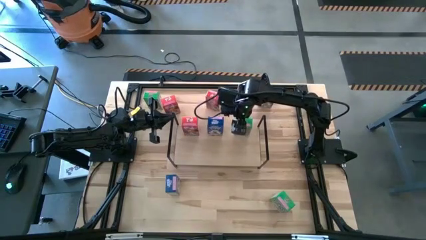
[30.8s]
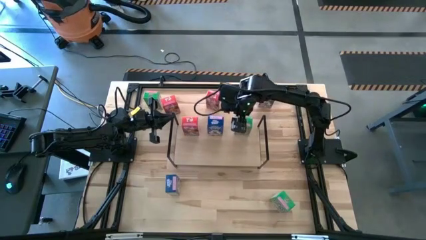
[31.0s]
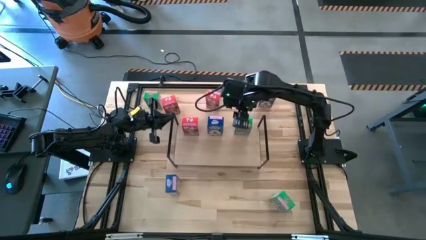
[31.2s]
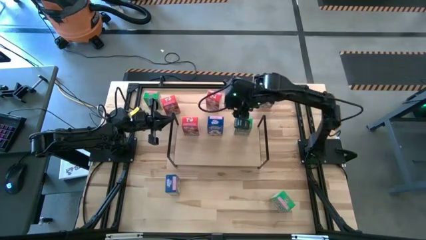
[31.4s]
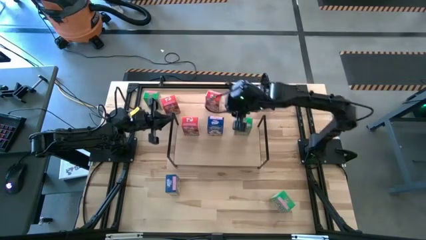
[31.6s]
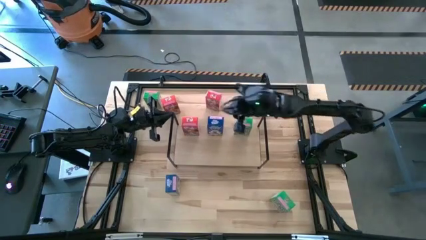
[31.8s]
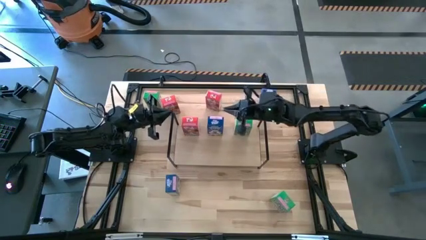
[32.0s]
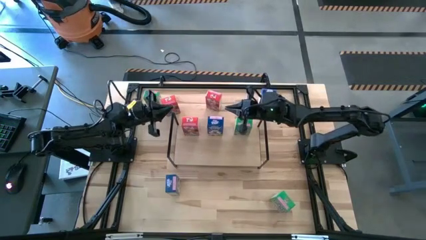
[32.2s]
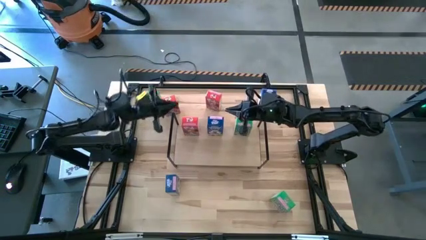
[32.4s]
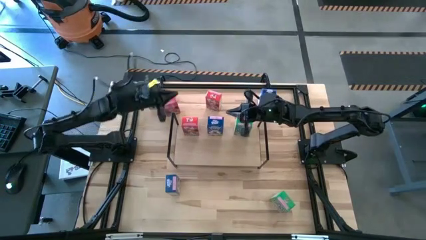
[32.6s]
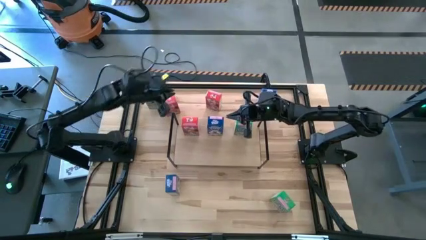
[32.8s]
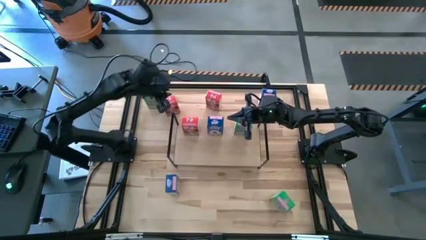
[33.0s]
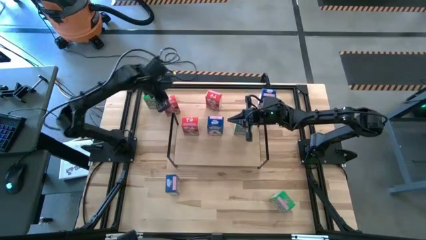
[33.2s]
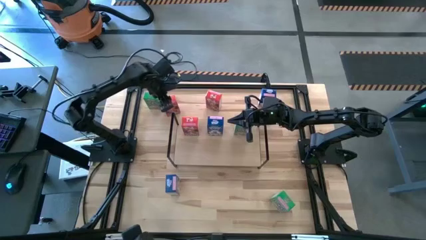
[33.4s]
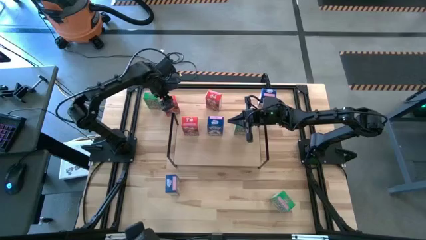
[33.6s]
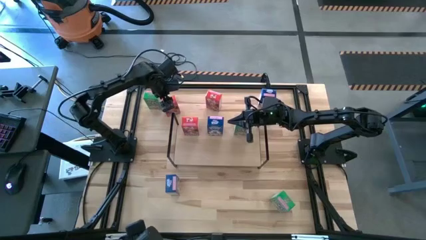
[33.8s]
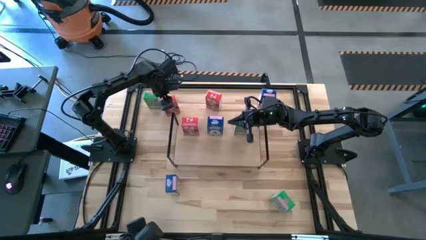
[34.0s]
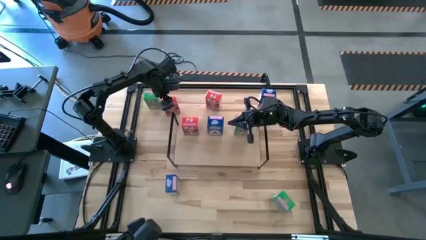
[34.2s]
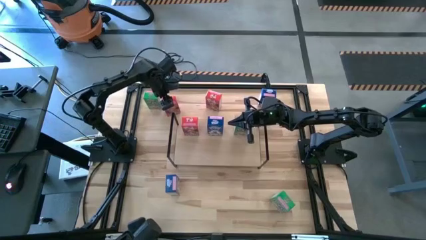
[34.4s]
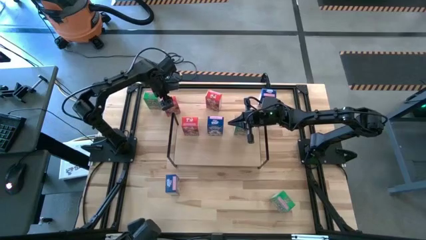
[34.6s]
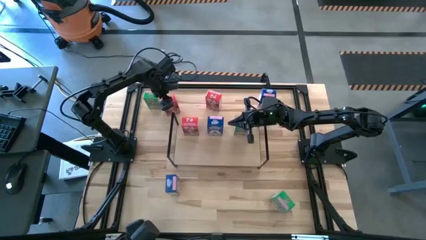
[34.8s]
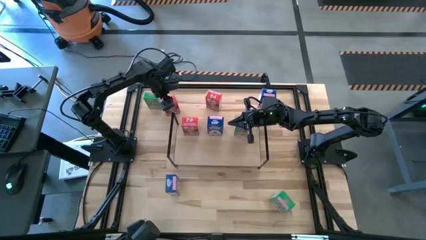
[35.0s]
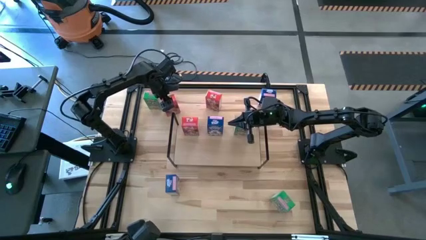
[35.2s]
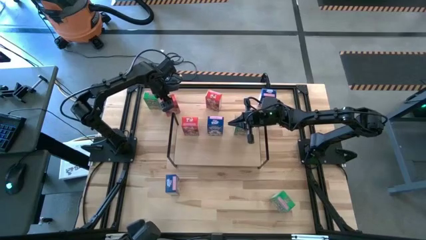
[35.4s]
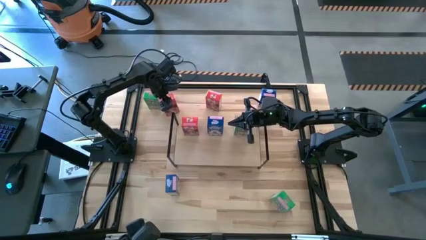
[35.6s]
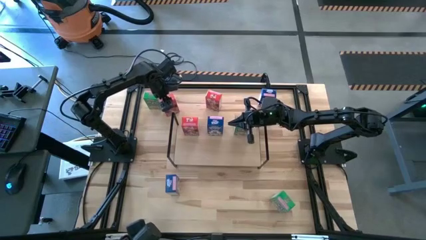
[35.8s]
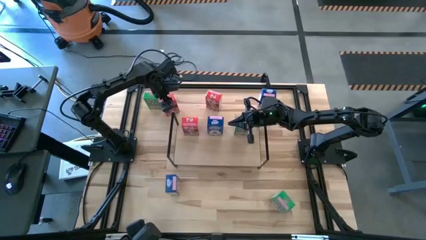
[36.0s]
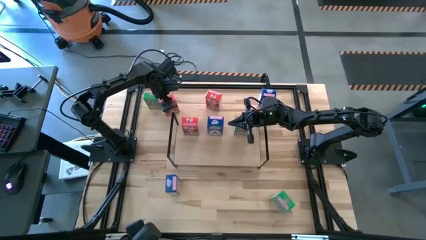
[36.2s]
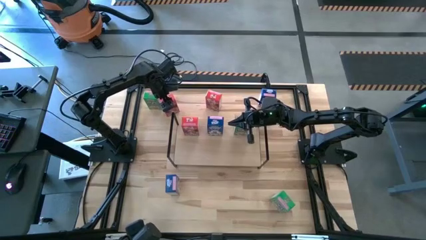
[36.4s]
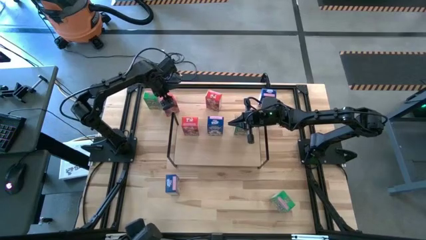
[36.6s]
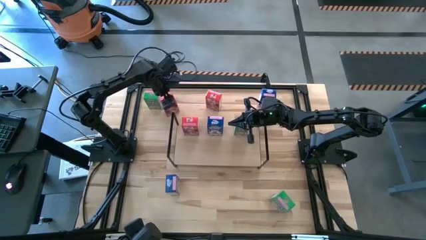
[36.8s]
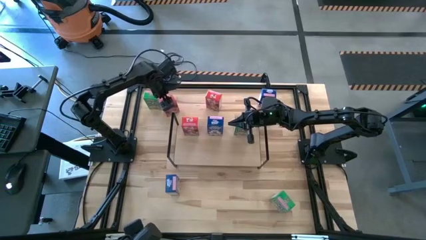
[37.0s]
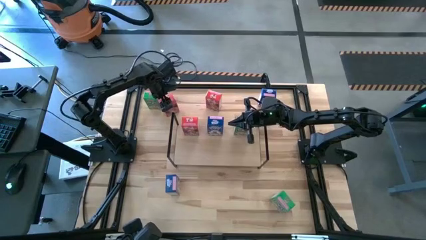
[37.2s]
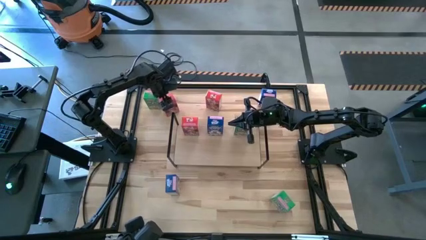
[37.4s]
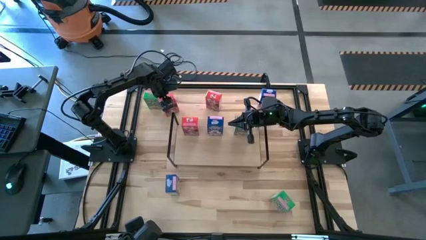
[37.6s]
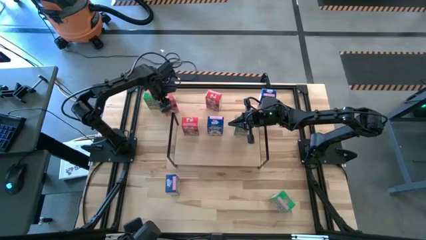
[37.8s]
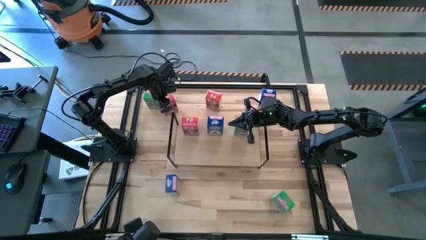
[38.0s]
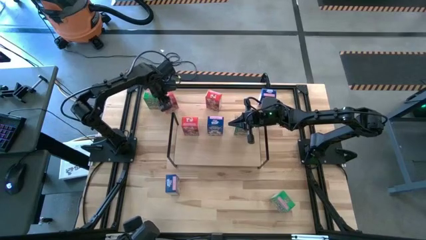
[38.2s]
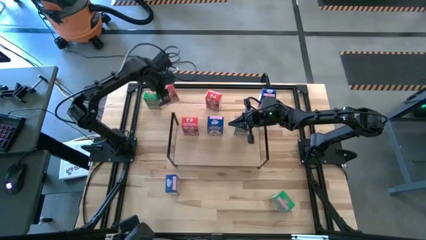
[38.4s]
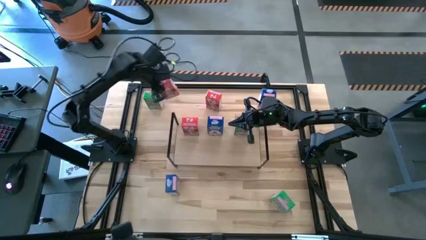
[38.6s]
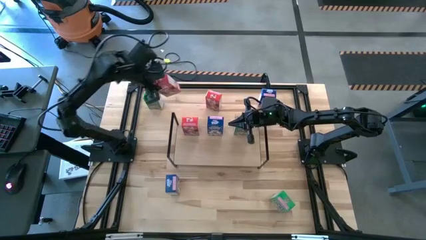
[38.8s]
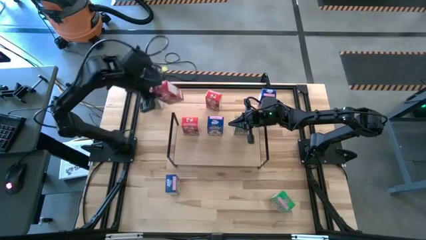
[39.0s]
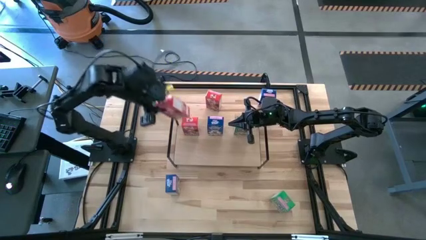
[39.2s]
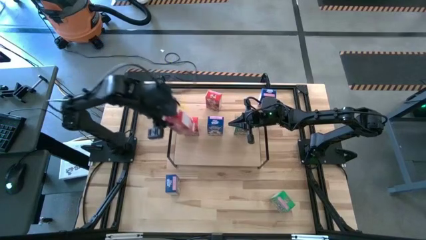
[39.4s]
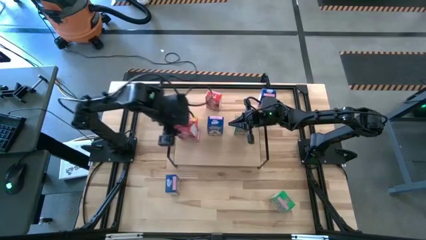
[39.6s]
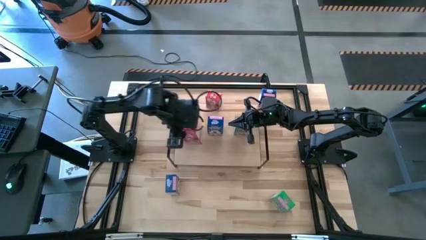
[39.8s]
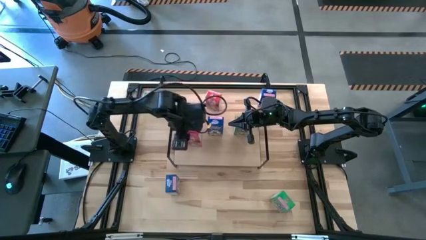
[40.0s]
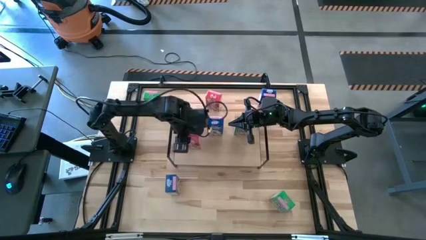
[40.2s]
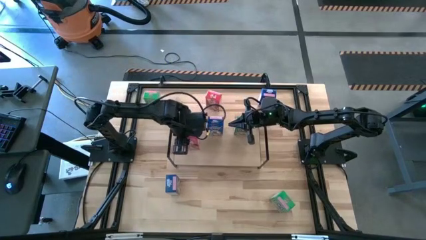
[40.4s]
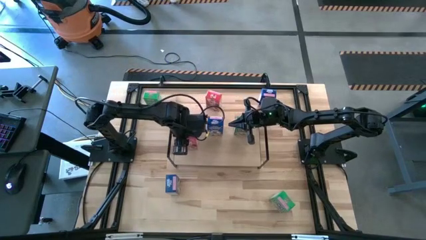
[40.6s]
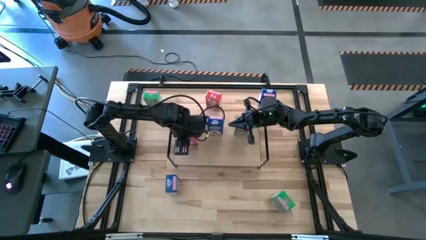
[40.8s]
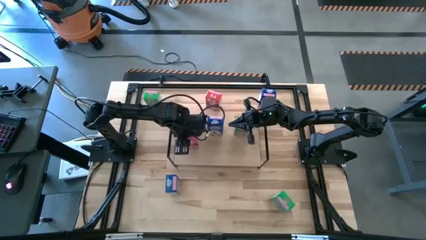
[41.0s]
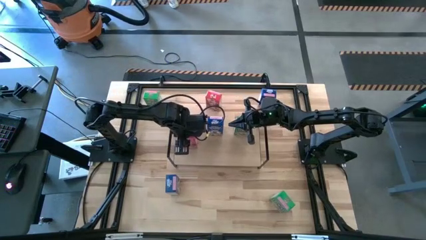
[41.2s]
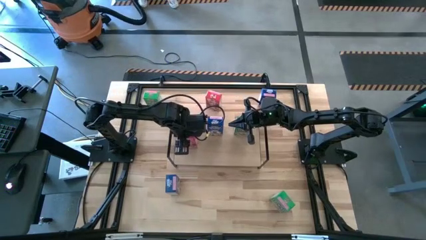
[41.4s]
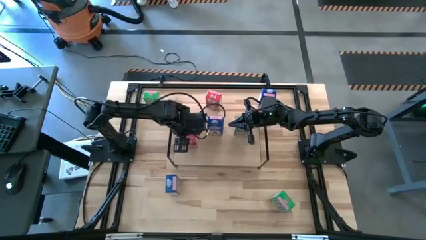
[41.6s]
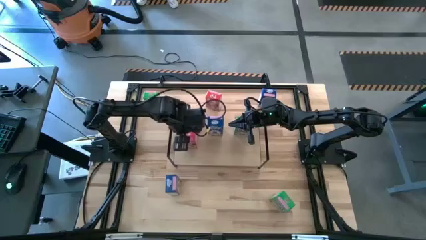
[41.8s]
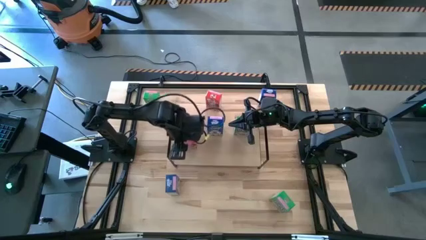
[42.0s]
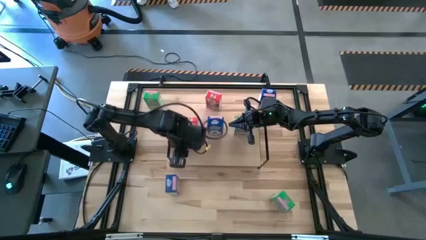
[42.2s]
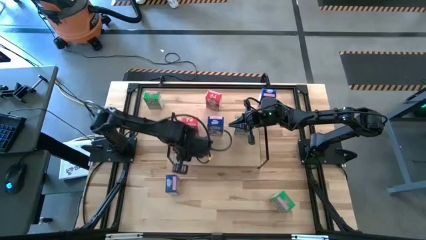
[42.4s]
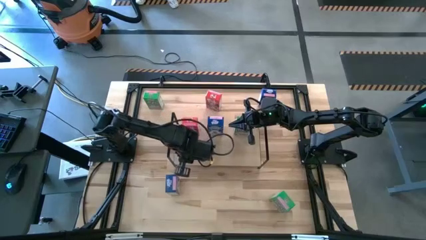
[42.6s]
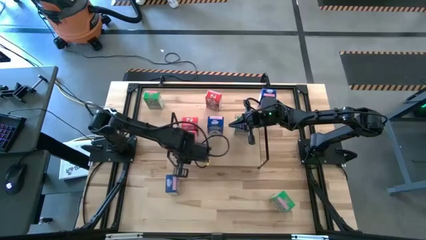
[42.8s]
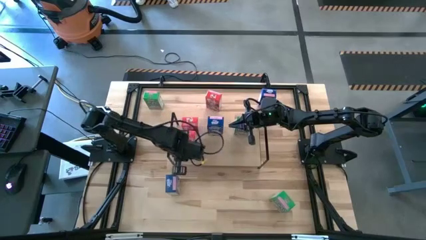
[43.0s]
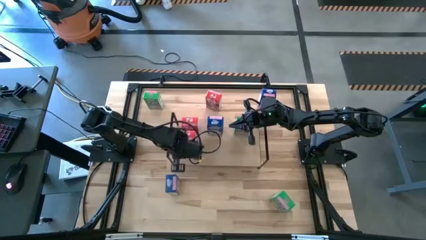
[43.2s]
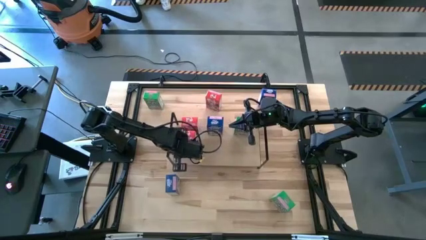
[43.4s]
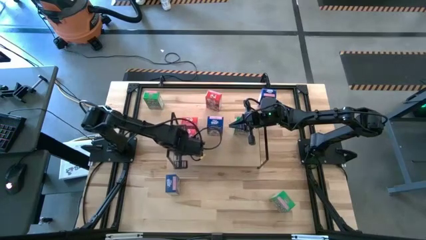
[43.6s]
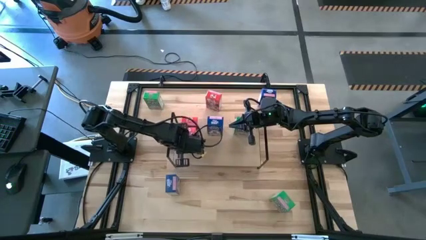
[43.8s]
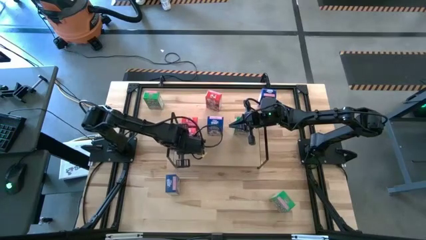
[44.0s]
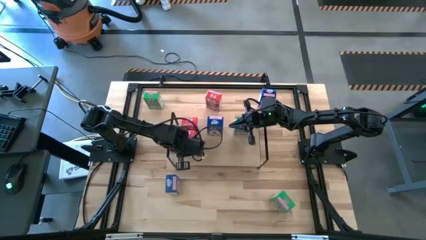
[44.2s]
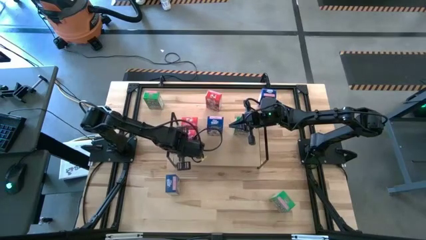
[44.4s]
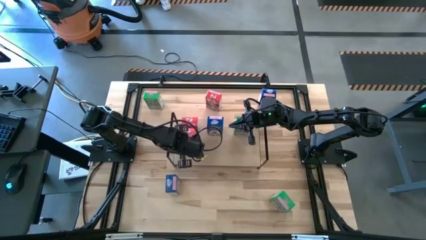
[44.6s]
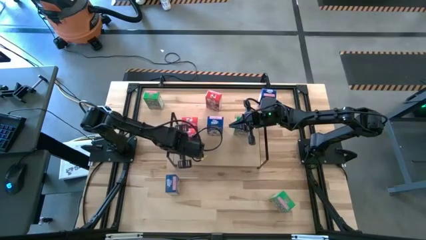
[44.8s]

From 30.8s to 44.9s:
Task: Stack cereal on shelf
Put the left red cereal box on the shelf aligned with the other red cereal box
